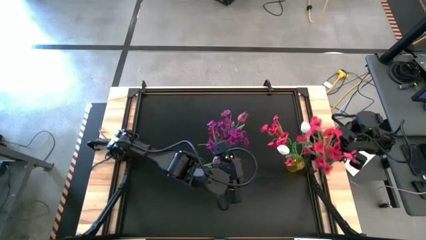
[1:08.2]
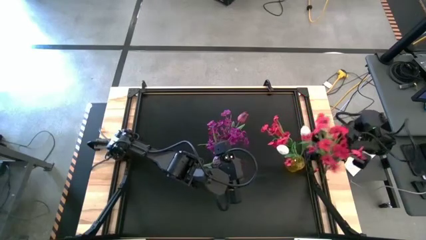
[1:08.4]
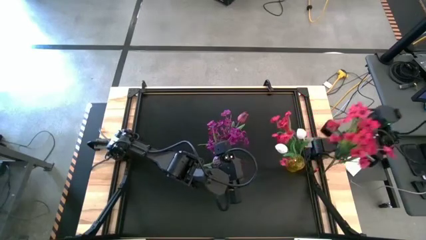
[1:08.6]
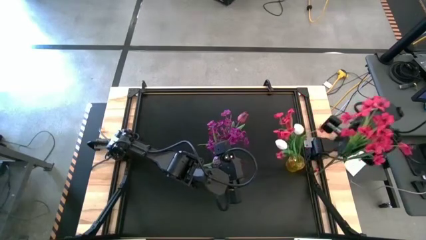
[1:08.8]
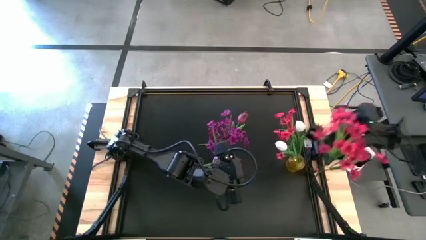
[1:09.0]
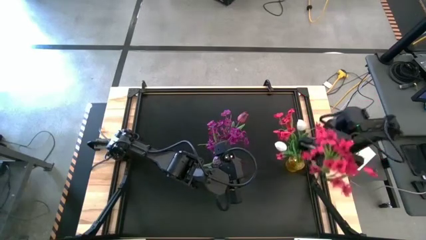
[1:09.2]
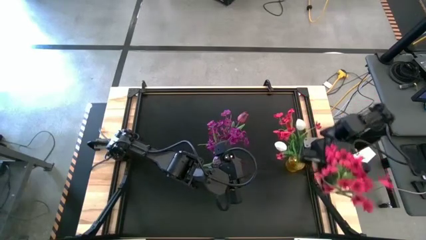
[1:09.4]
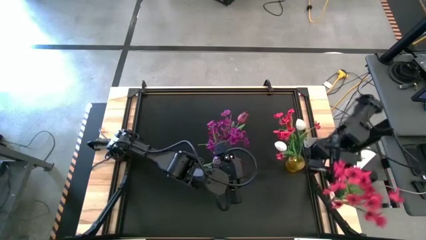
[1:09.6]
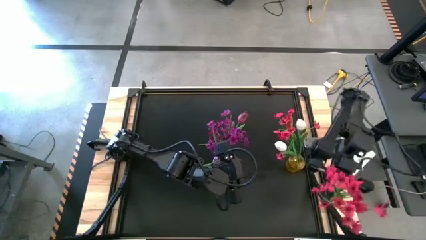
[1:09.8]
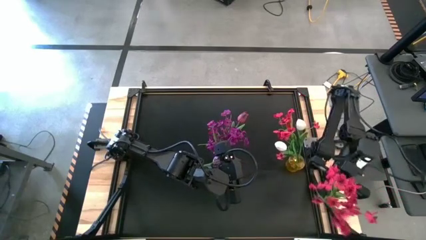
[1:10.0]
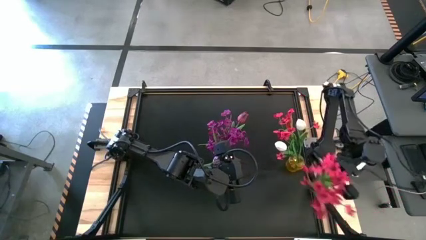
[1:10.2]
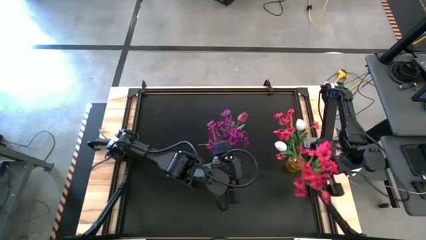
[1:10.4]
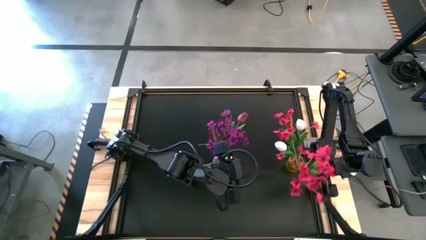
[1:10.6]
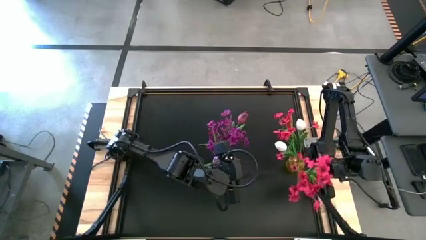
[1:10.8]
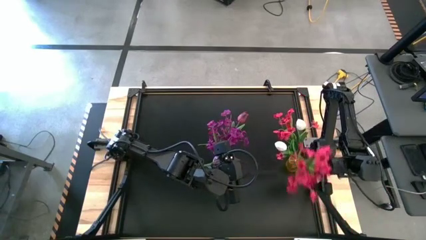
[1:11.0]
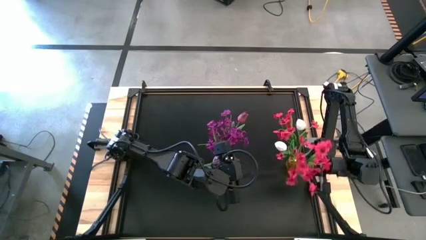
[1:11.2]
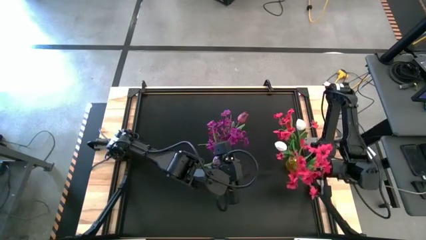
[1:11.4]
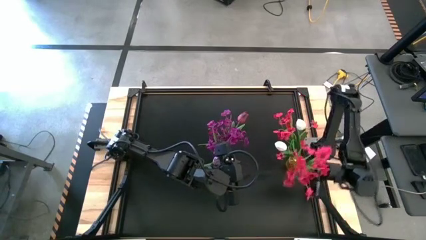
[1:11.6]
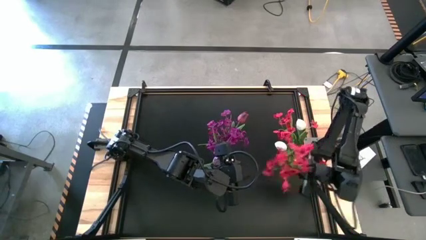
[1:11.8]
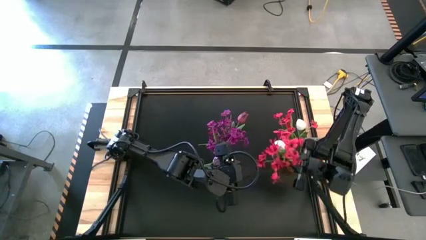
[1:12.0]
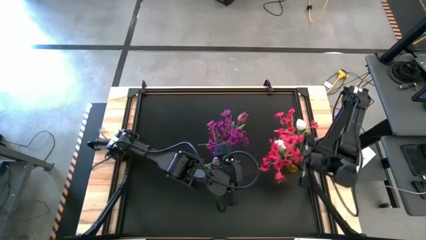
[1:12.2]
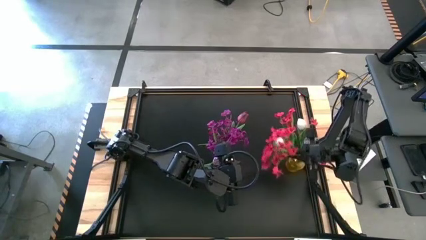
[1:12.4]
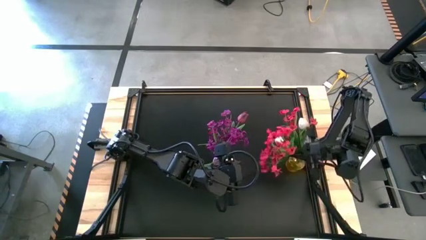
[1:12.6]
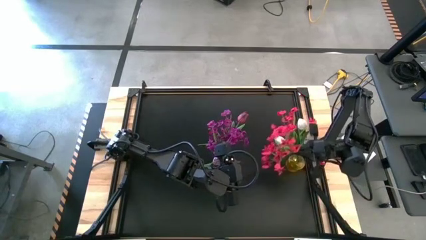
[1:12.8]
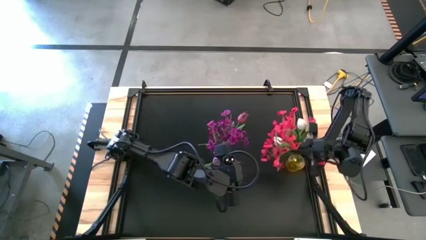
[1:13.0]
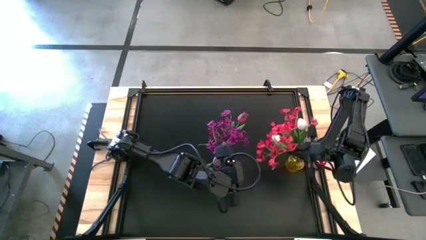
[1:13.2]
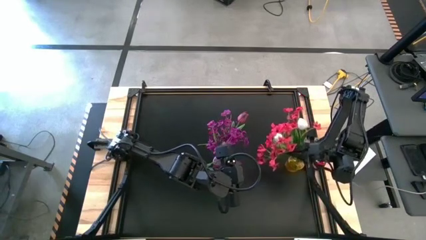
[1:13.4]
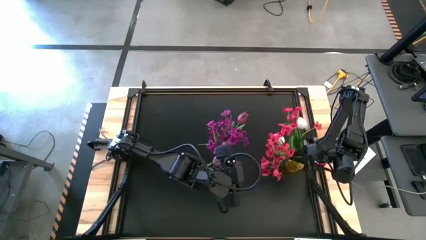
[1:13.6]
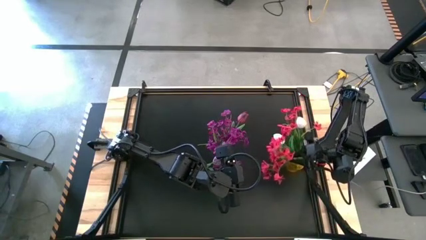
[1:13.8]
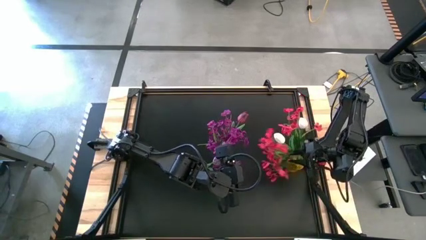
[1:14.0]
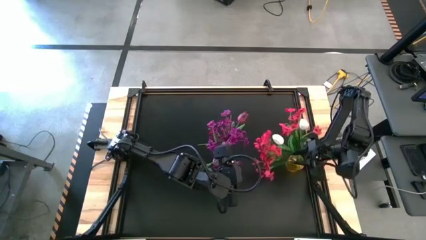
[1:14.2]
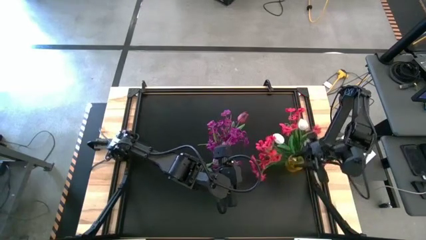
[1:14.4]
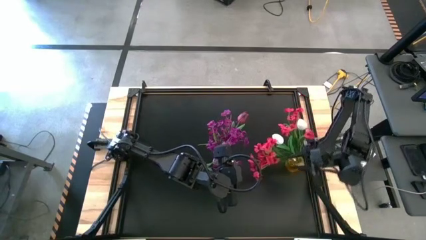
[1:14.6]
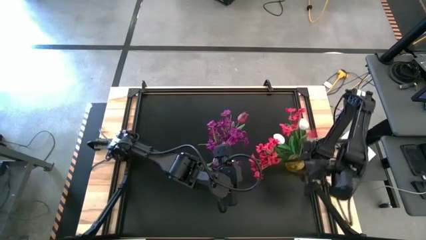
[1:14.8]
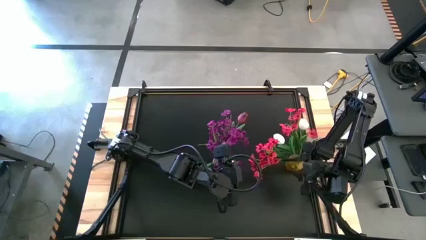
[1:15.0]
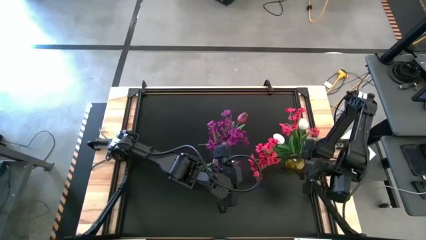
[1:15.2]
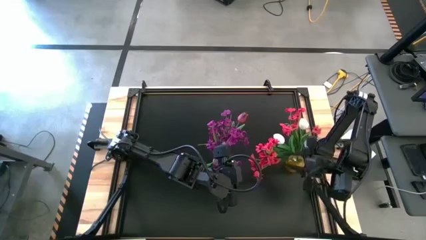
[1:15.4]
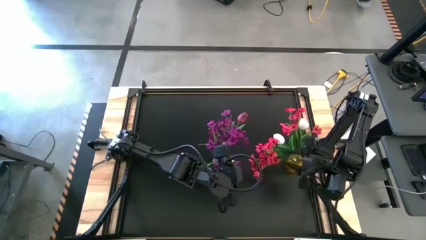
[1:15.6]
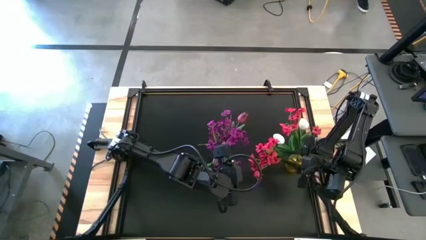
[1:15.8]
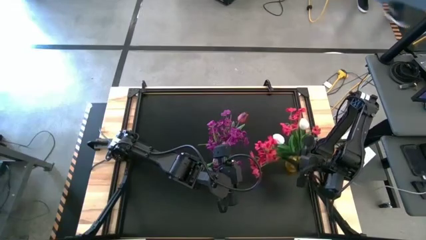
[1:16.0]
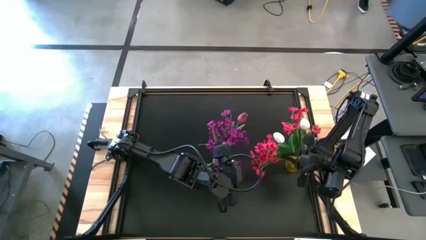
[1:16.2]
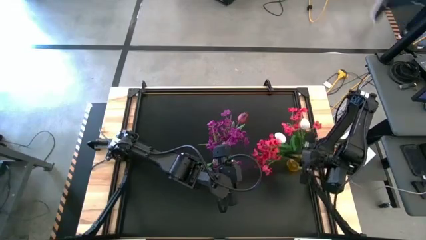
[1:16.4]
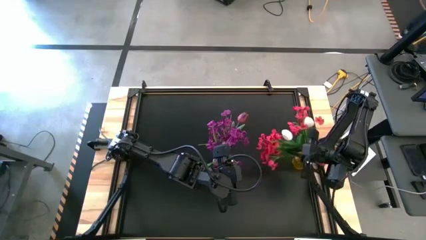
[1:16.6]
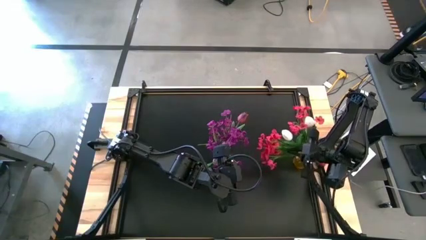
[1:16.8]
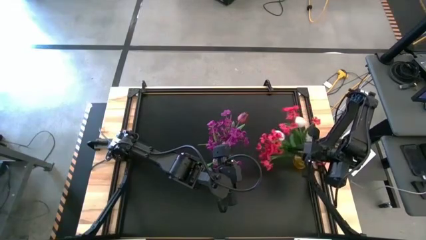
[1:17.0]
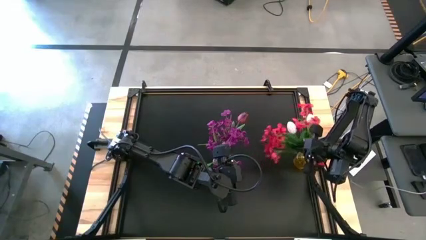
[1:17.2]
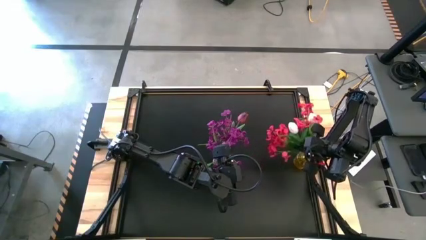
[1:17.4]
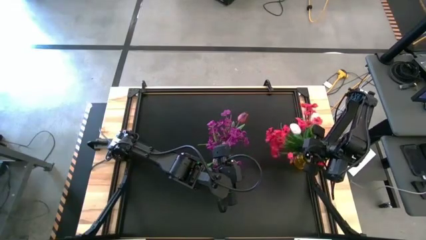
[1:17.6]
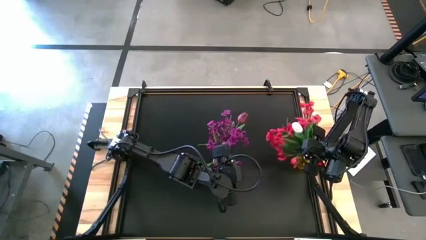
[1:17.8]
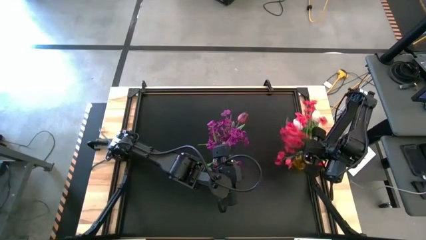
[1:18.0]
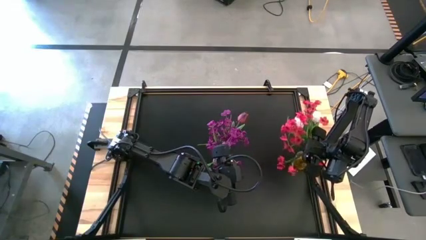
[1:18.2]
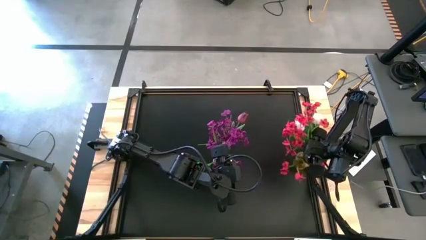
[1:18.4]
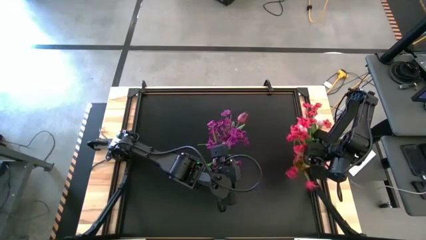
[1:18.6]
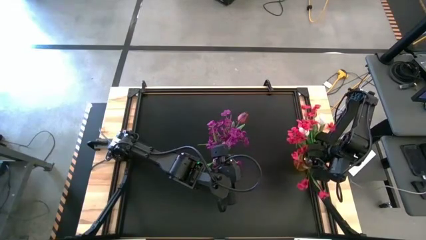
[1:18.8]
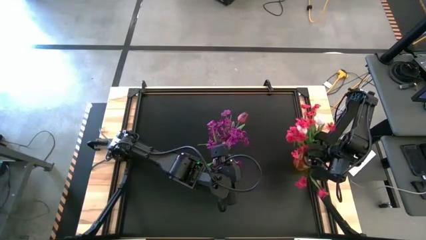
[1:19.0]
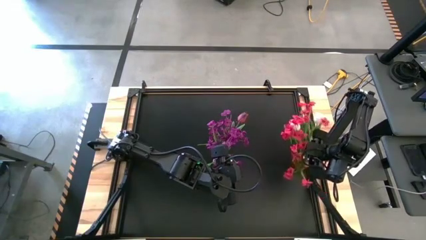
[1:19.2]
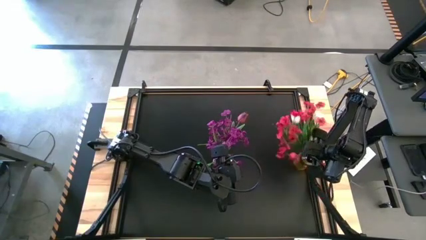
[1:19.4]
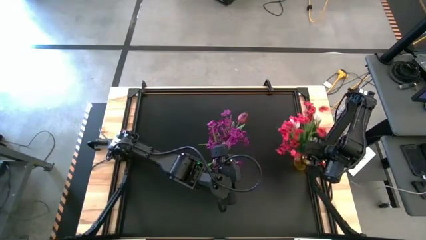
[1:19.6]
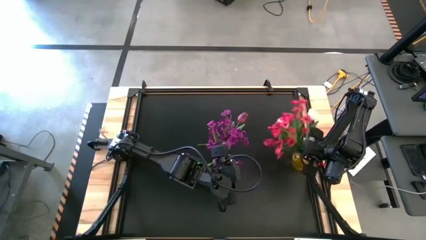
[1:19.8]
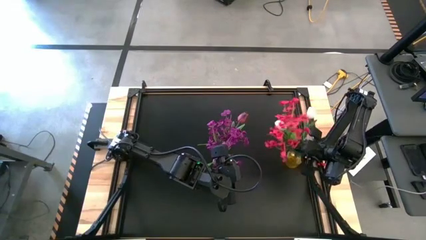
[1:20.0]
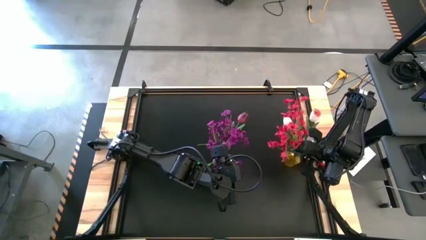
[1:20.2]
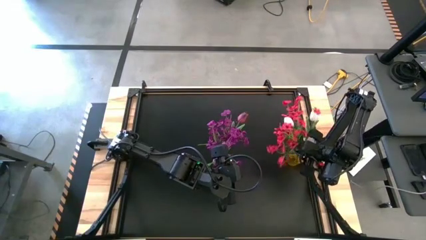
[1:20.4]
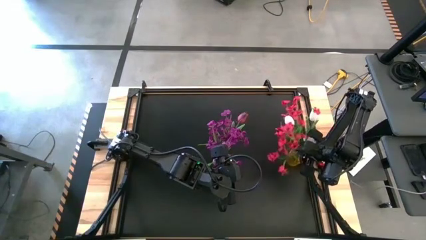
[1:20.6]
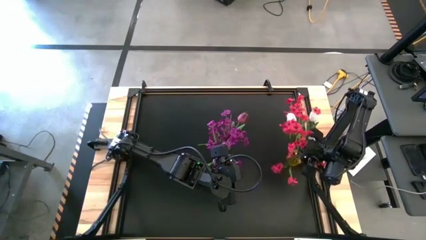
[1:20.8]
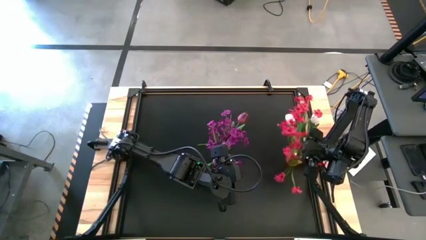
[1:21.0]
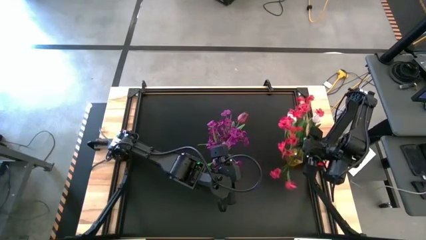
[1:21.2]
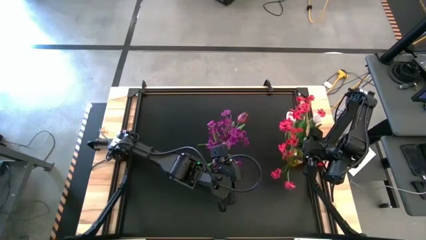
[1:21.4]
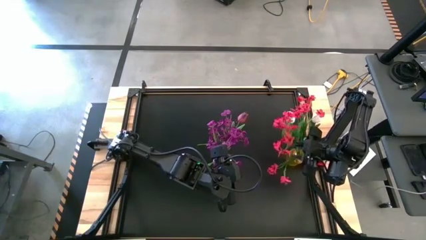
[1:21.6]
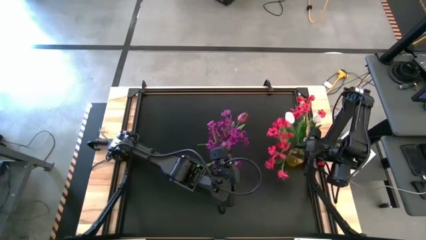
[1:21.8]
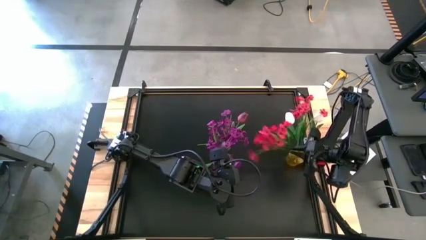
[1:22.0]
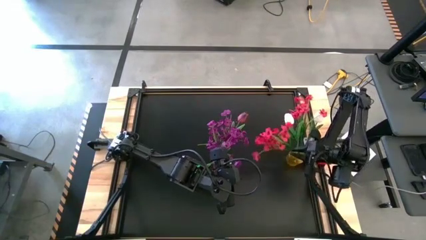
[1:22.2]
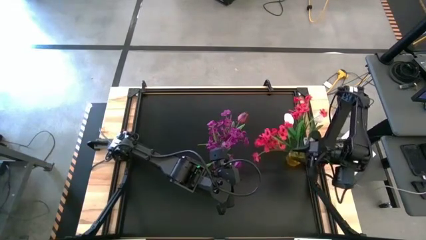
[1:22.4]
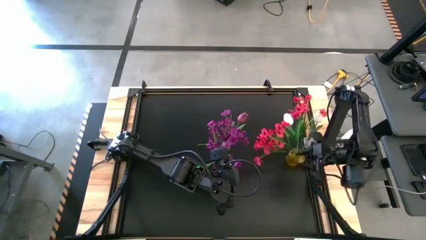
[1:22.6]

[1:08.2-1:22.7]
Task: Sort flowers into vase by color
Put the red flowers into the yellow vase
